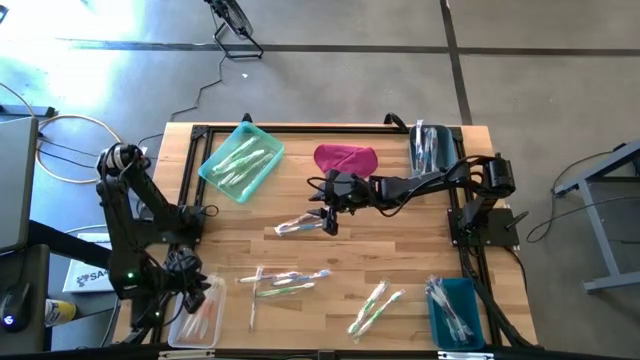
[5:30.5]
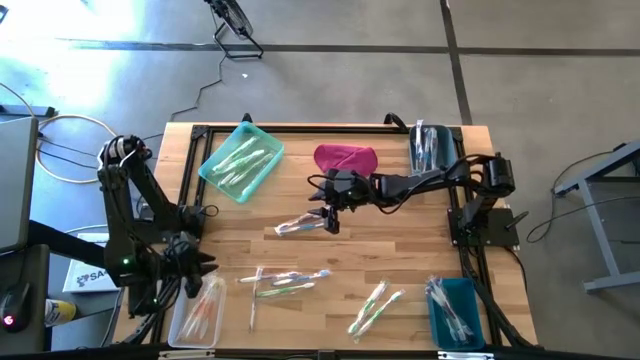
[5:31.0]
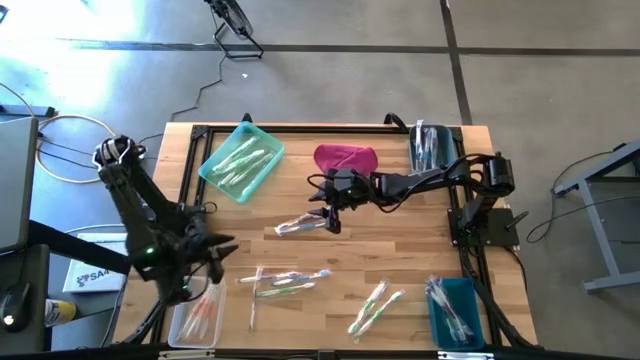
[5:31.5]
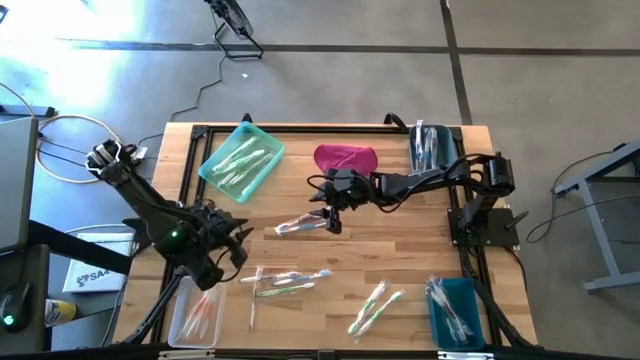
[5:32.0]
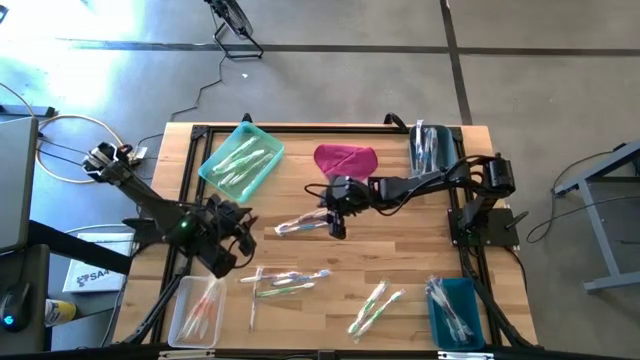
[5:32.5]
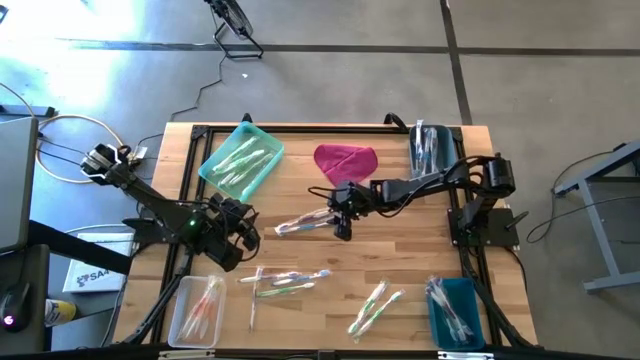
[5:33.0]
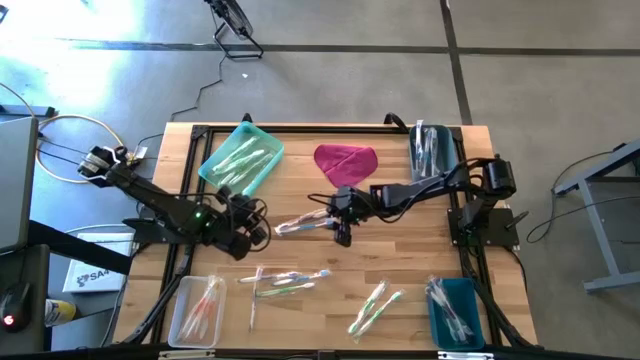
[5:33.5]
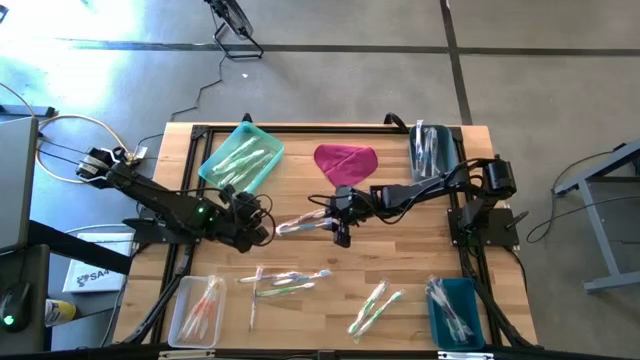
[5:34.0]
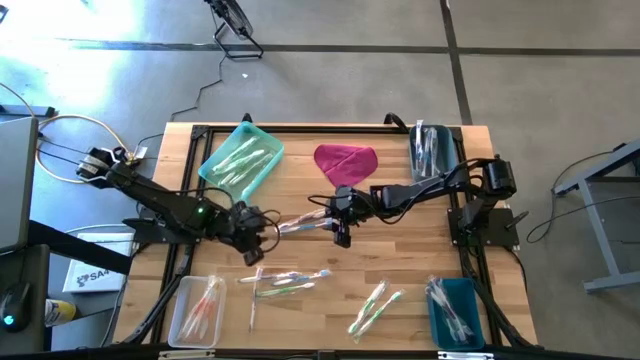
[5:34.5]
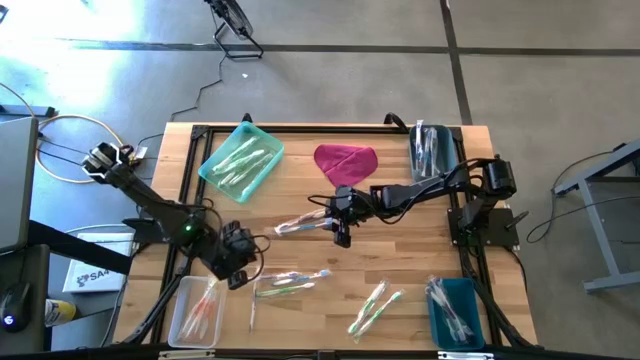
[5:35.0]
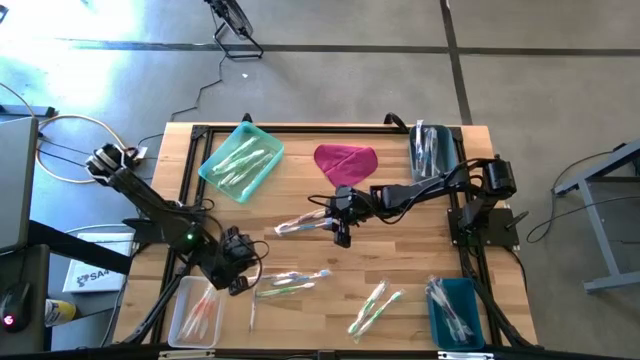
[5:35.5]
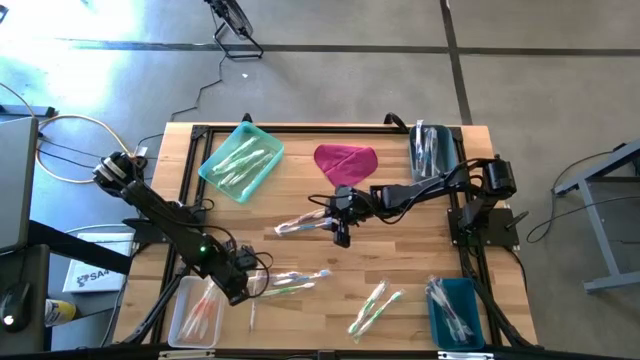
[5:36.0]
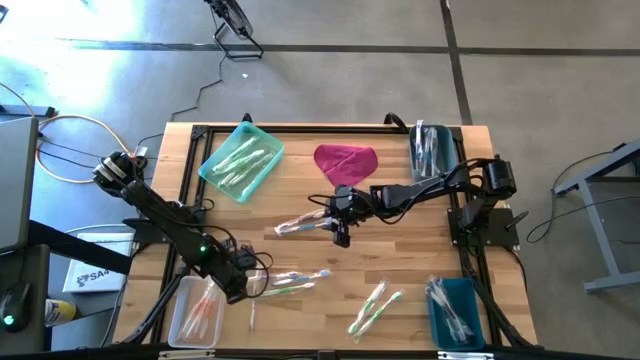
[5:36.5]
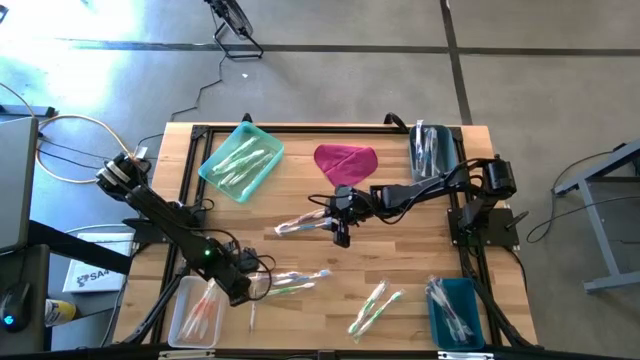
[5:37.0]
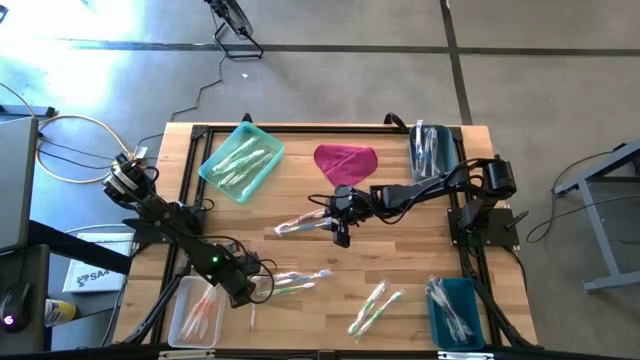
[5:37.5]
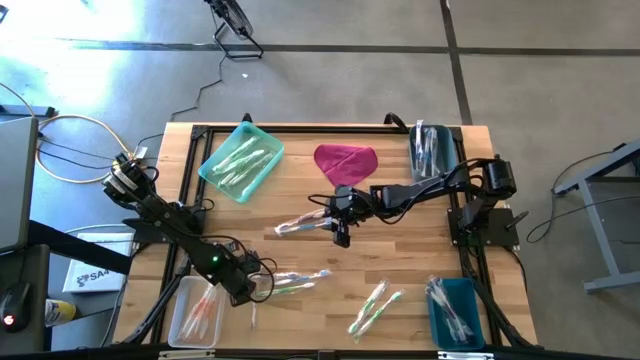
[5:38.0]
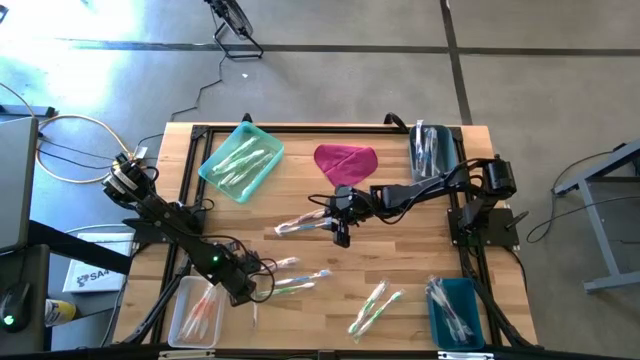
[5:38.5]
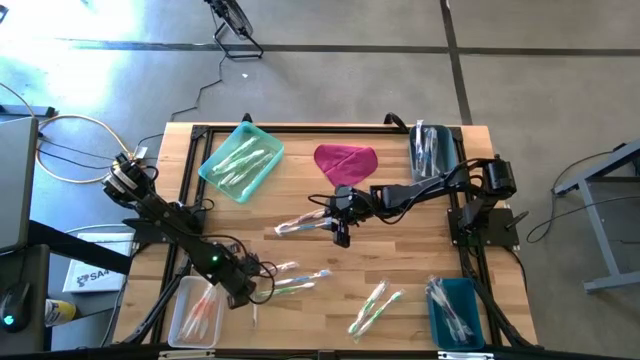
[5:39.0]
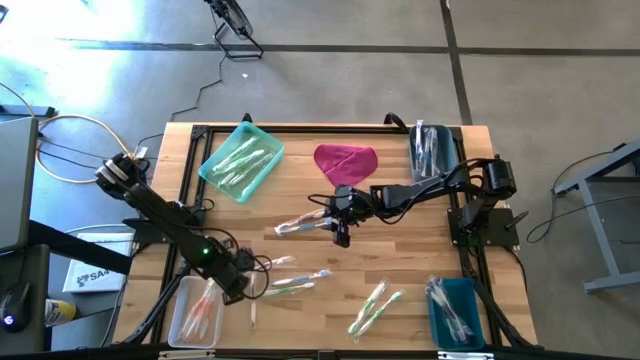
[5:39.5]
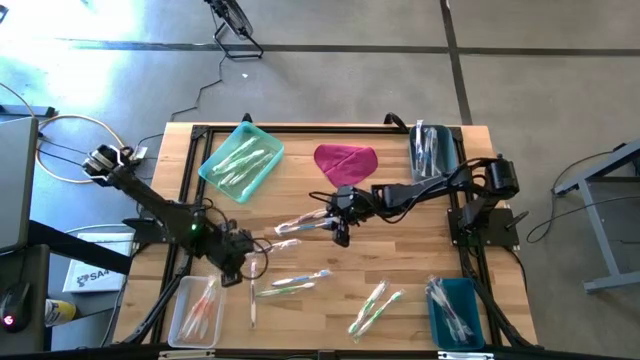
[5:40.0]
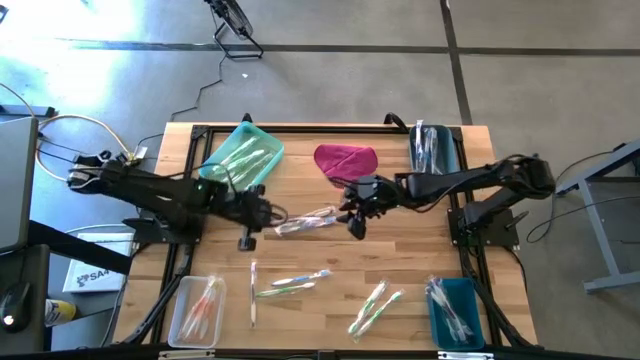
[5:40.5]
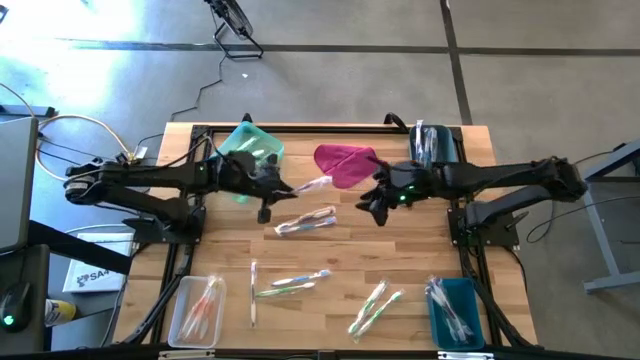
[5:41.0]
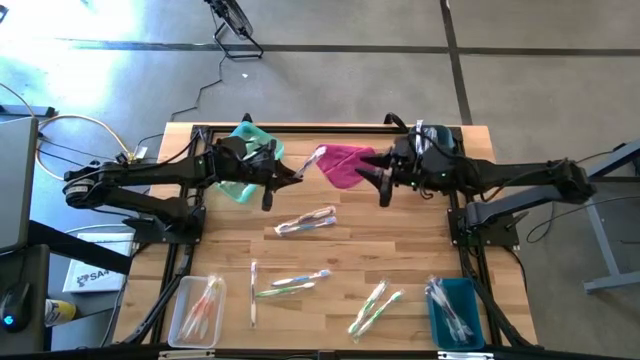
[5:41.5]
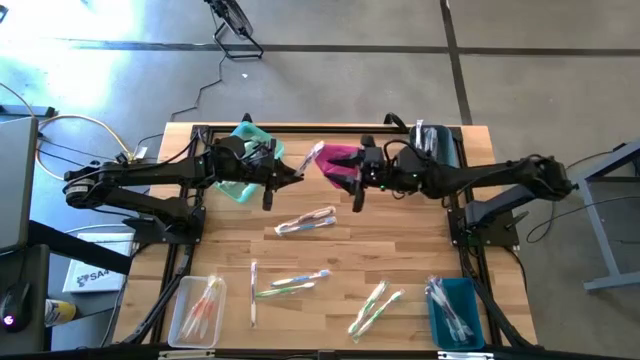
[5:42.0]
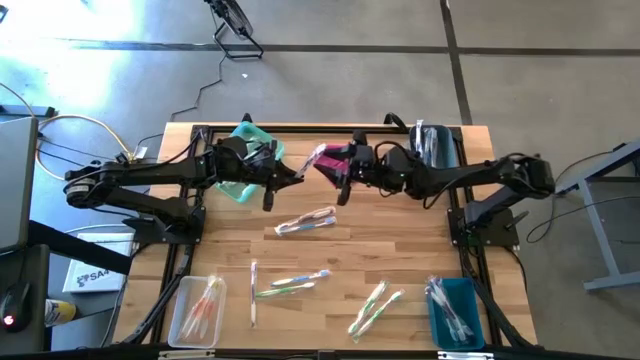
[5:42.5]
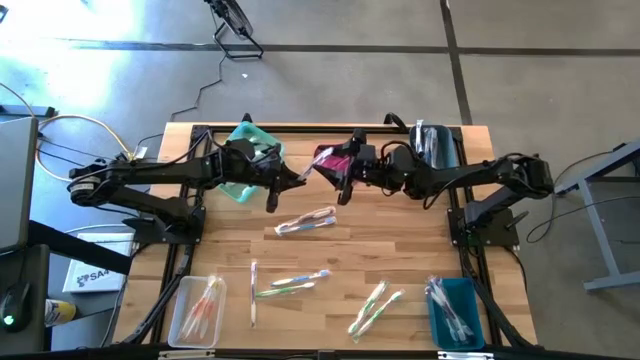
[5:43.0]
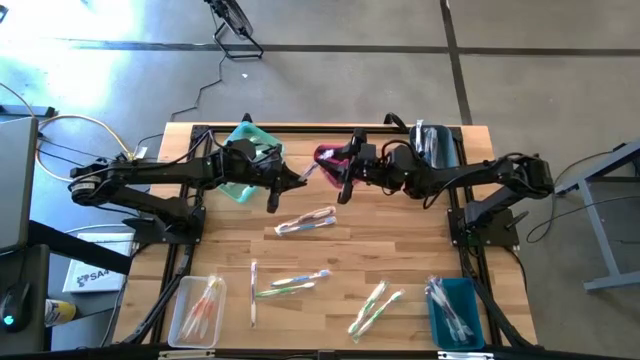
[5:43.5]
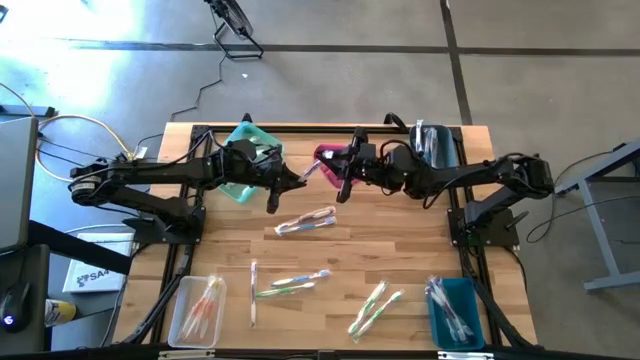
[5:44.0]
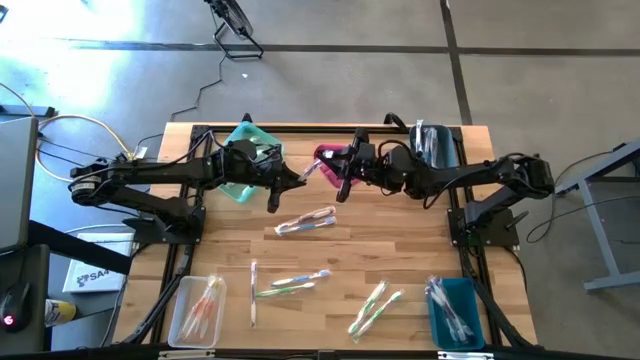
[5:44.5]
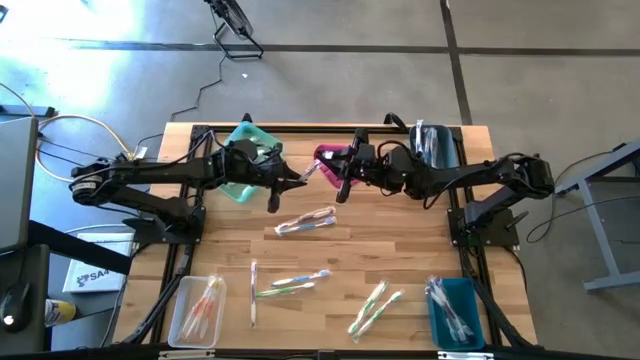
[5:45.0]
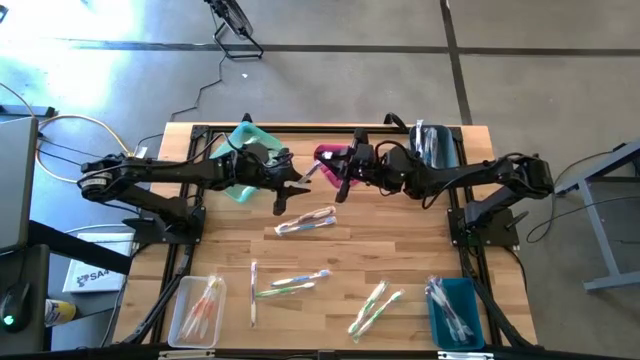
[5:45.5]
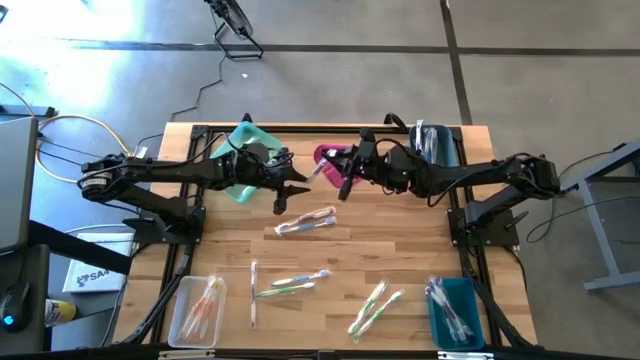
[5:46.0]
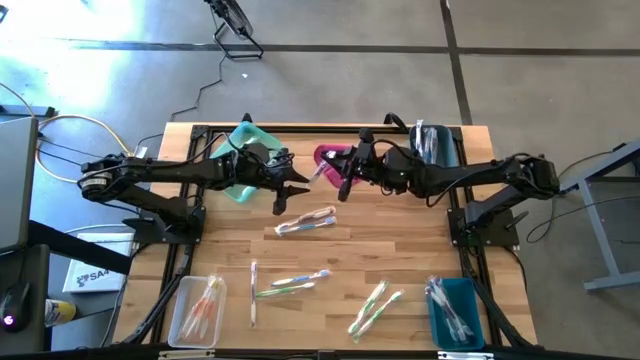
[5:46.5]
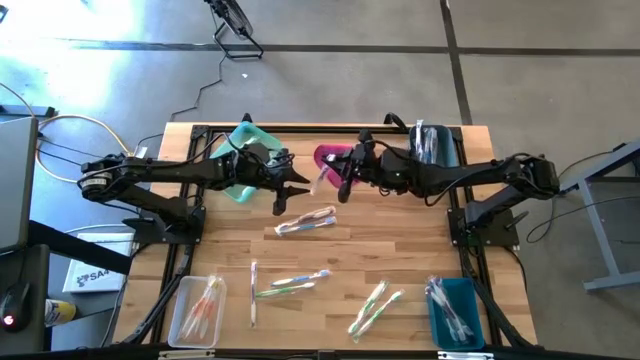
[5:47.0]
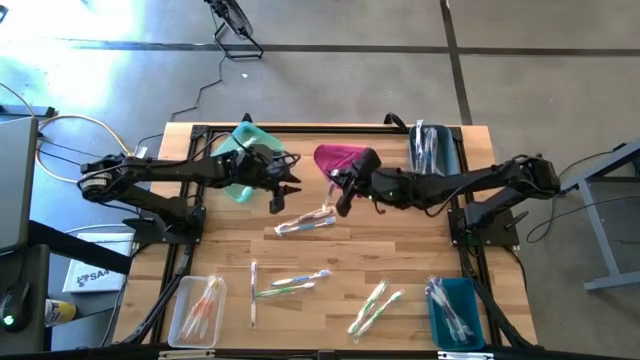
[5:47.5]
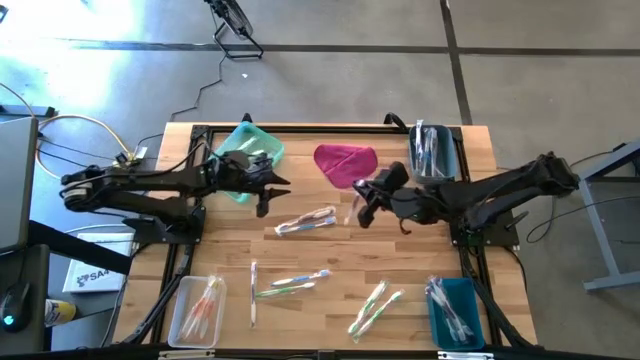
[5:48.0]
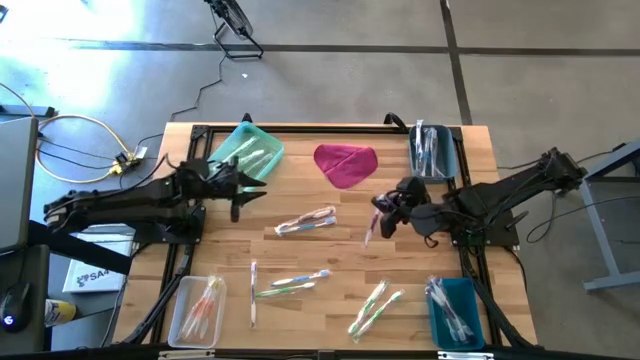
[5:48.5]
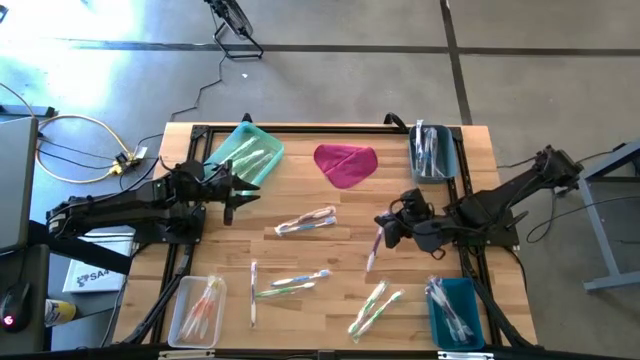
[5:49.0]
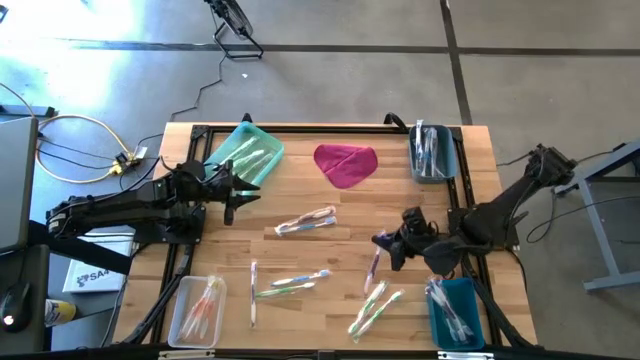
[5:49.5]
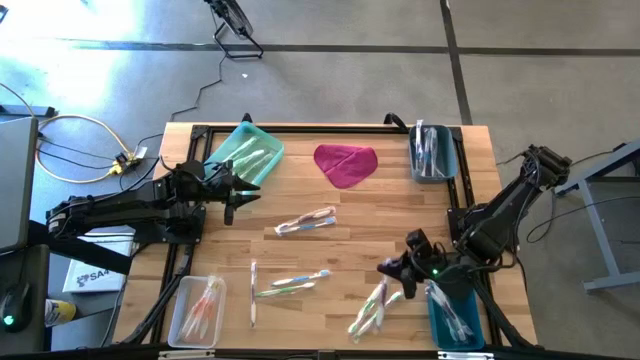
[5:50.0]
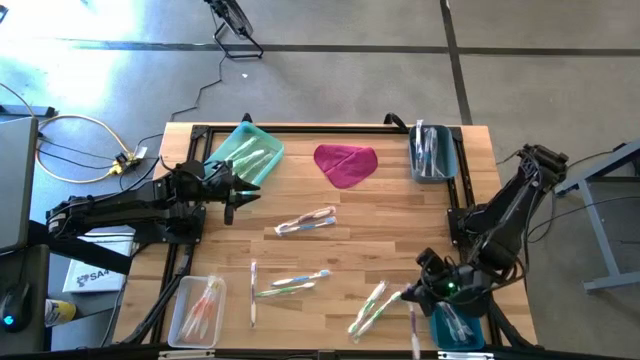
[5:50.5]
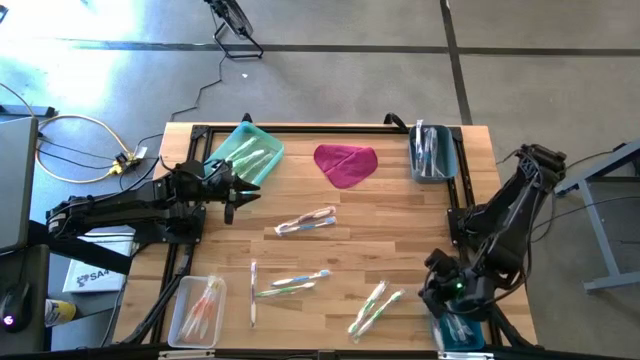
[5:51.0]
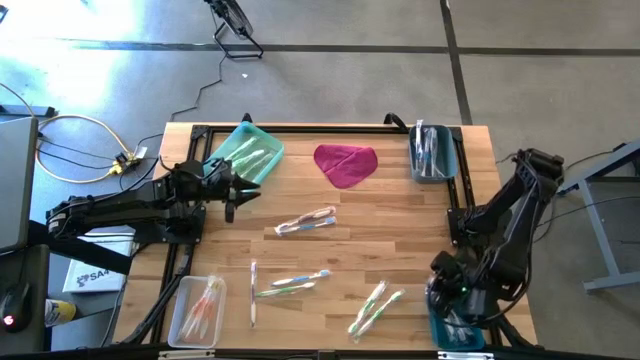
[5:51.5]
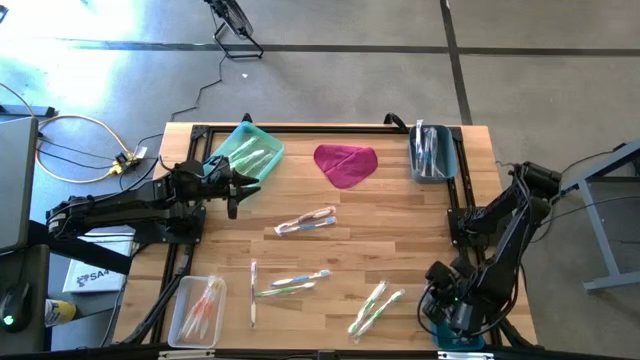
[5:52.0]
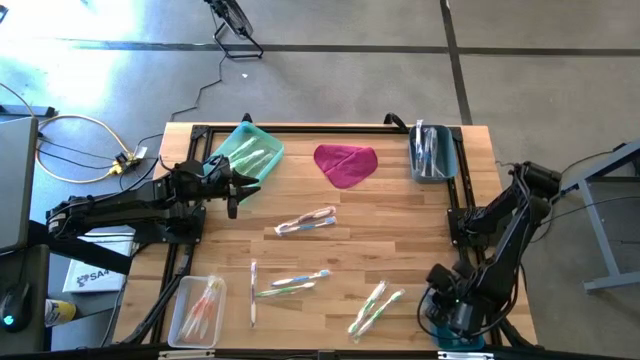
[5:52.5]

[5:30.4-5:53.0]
Task: Pick & Place Toothbrushes
Put the purple toothbrush to the dark blue bin bin
